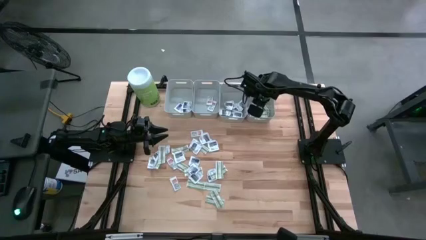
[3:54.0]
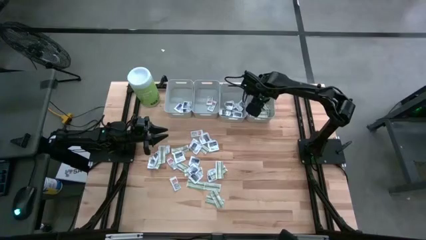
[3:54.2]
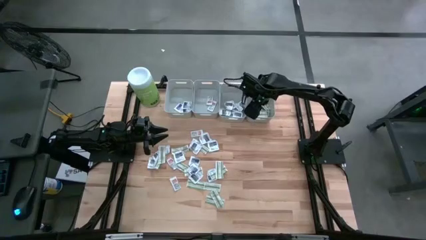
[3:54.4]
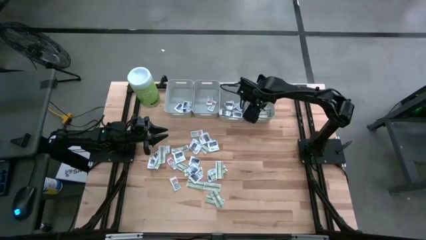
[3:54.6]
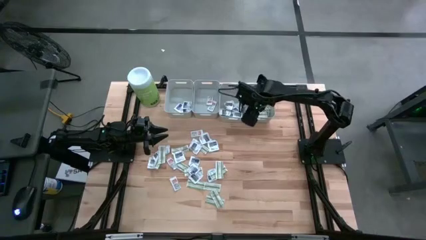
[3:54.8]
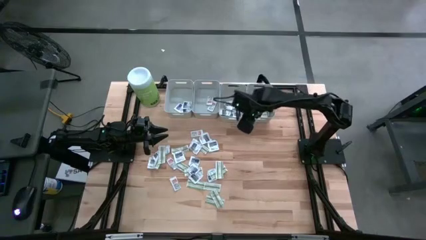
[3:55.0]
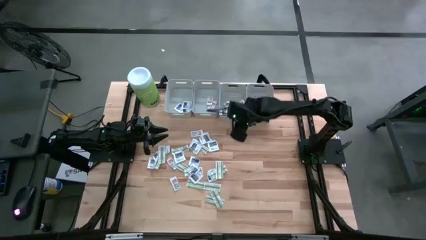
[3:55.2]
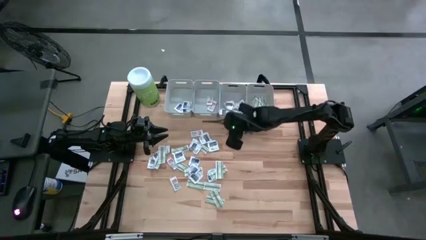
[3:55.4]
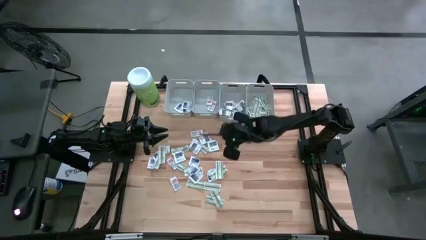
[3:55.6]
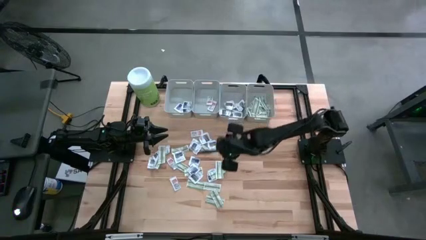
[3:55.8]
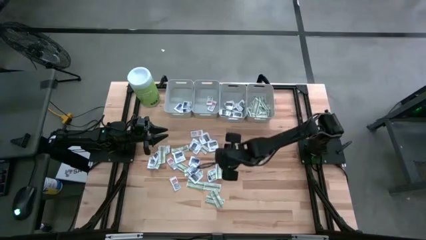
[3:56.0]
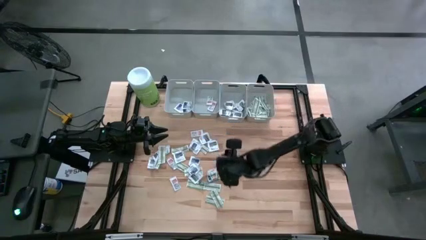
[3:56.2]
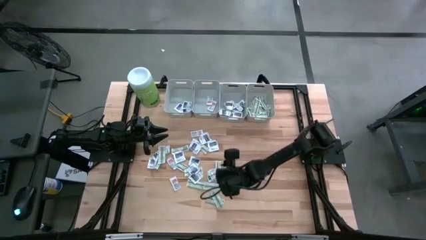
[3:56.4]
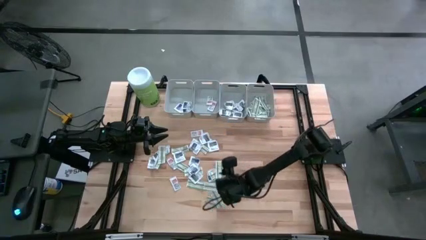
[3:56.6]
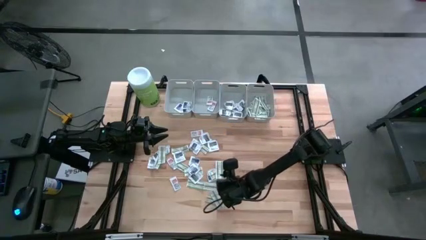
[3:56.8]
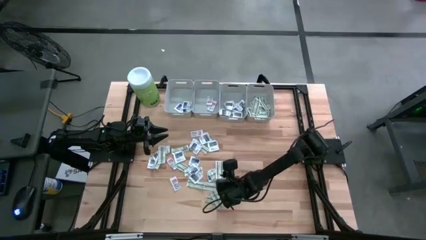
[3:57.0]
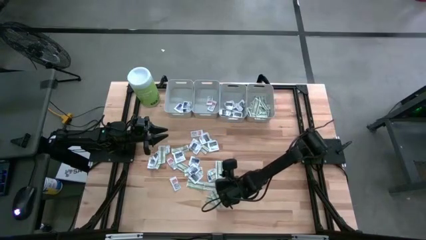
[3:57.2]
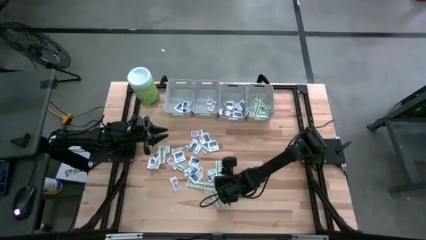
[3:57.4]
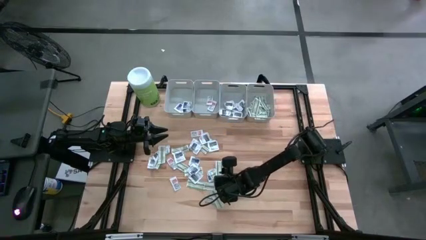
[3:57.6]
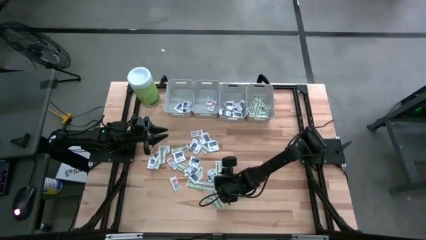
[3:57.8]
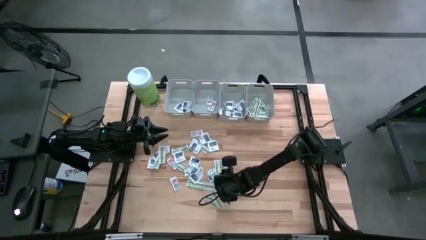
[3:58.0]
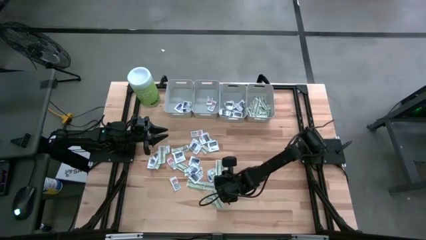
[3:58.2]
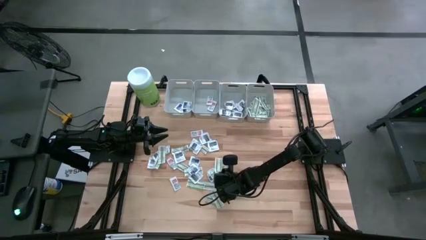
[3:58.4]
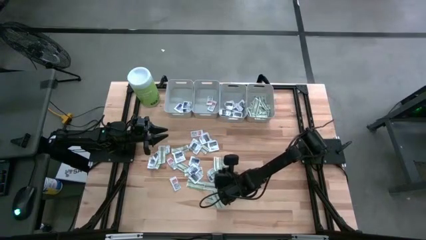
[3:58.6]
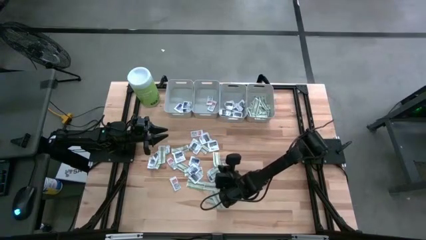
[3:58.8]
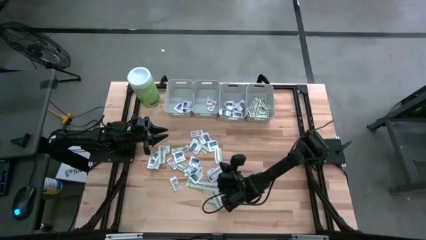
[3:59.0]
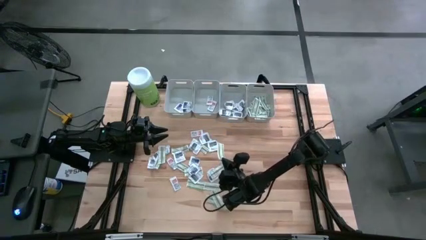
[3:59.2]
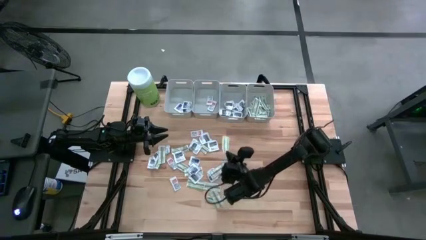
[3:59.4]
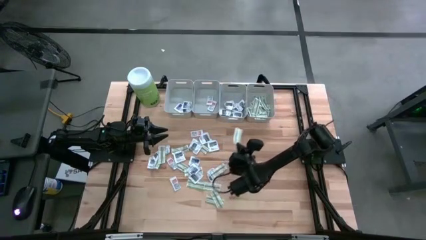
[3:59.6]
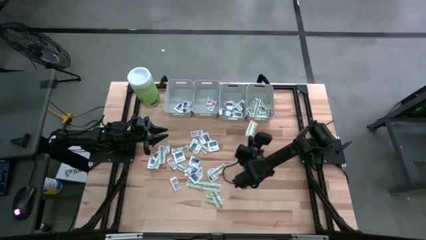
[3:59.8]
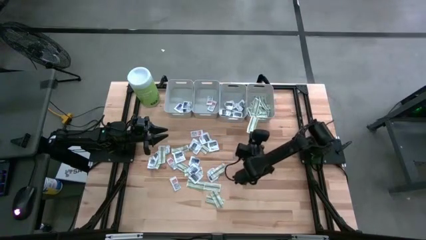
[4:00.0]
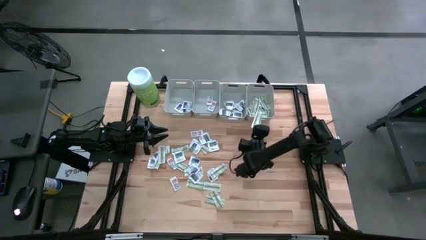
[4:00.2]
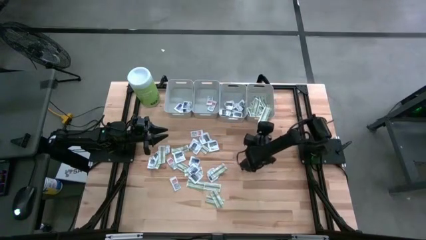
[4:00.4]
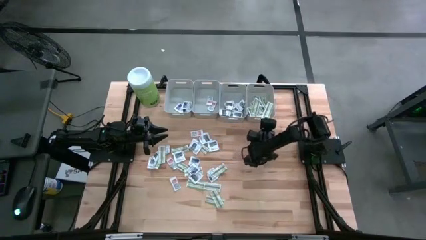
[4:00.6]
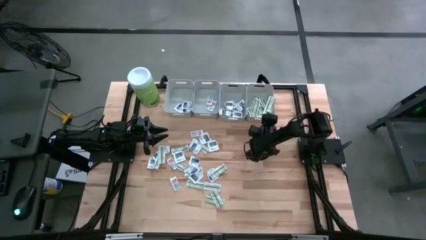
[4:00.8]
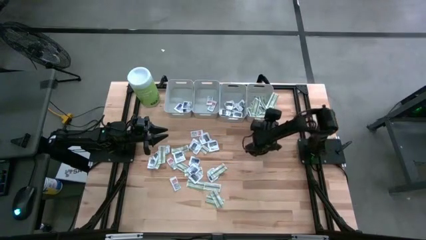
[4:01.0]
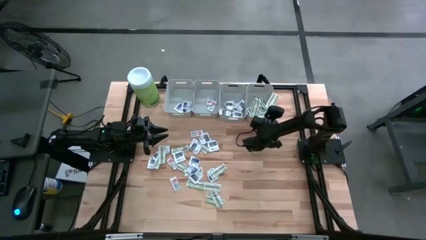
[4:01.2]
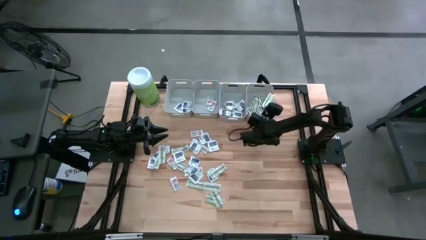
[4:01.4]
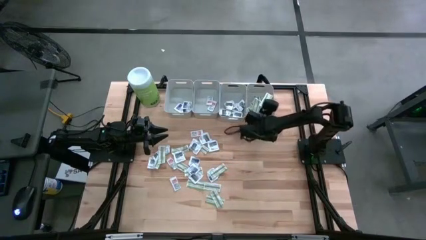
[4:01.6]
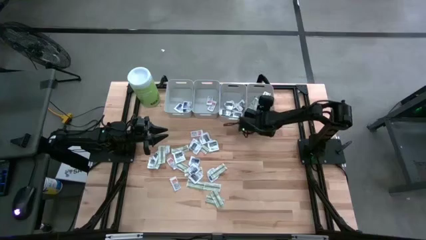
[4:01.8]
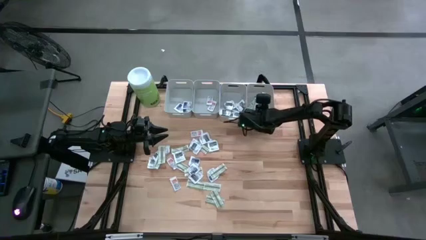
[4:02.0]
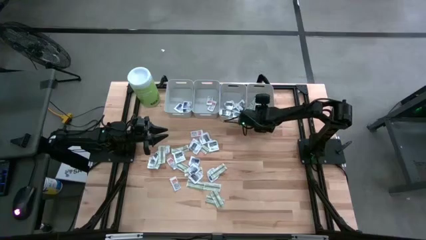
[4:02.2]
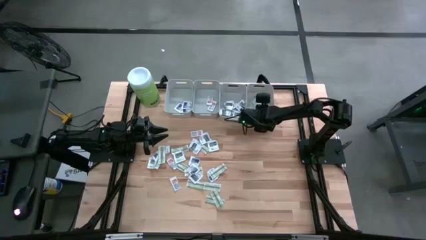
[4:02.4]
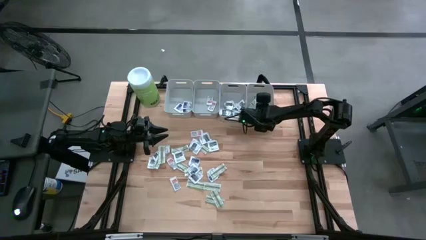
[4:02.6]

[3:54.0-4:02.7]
Task: Pick & Place First Aid Supplies
Put the bandage into the right gray bin

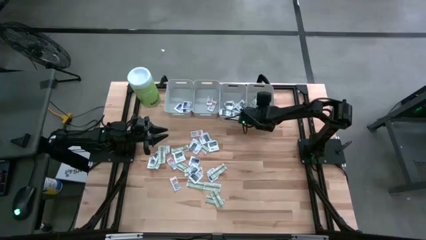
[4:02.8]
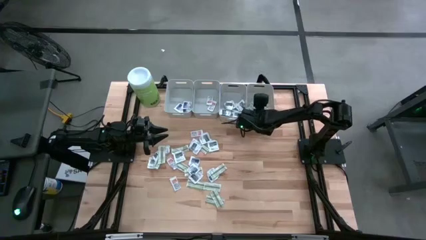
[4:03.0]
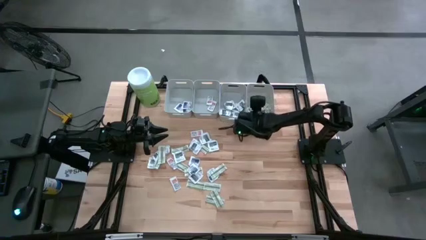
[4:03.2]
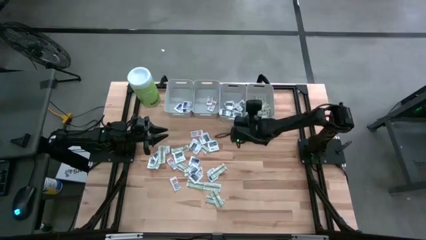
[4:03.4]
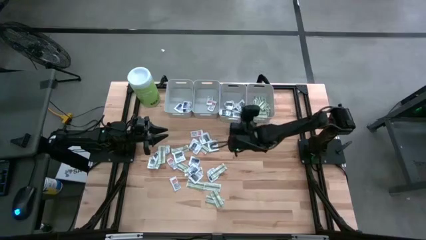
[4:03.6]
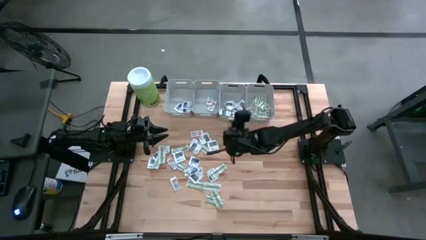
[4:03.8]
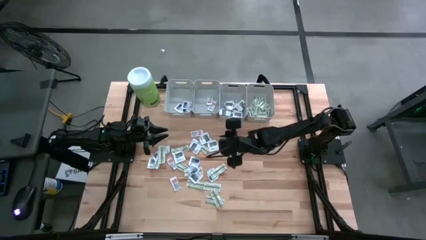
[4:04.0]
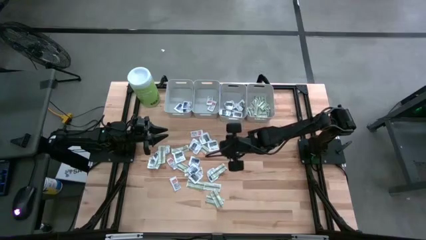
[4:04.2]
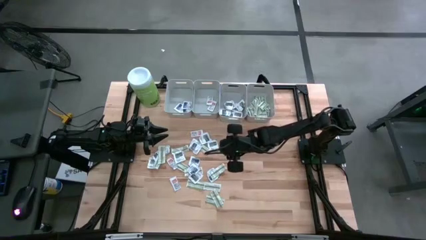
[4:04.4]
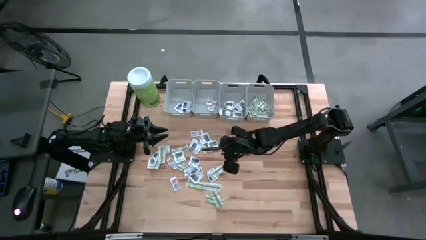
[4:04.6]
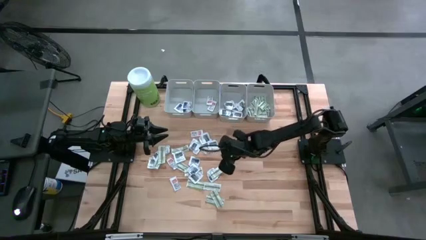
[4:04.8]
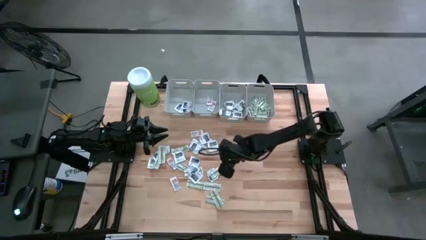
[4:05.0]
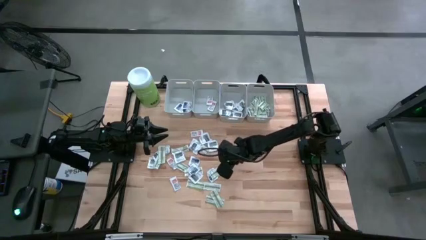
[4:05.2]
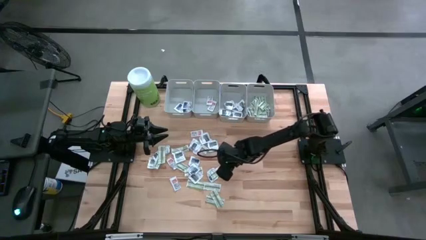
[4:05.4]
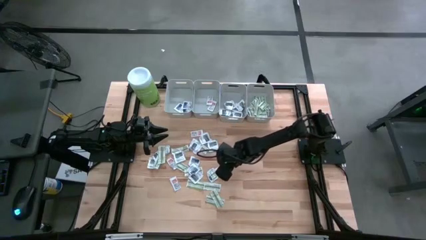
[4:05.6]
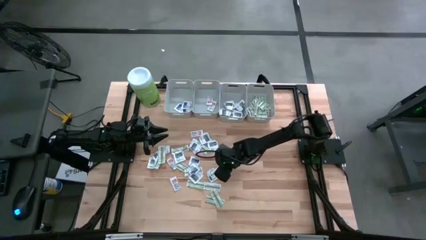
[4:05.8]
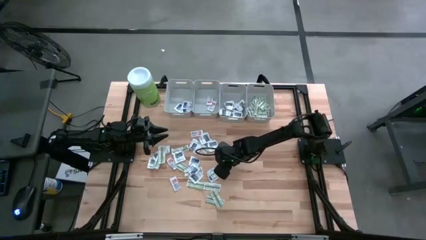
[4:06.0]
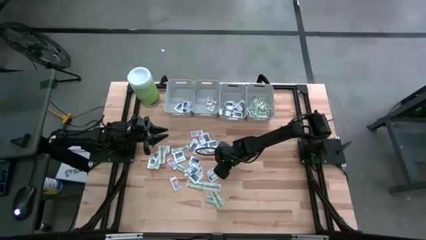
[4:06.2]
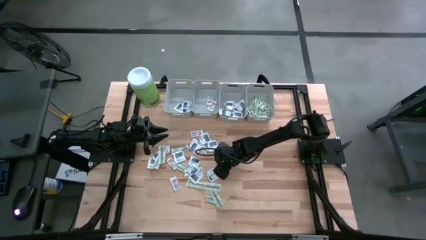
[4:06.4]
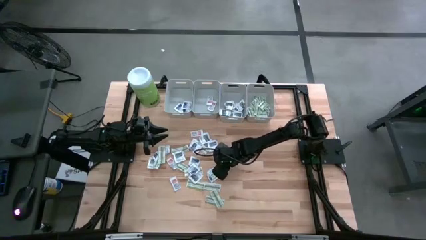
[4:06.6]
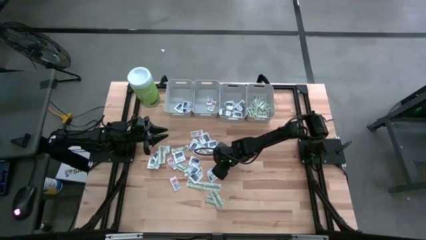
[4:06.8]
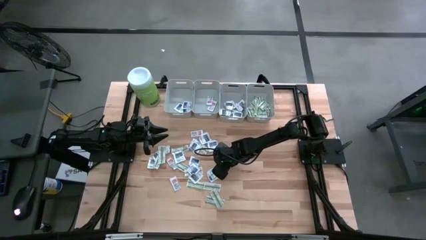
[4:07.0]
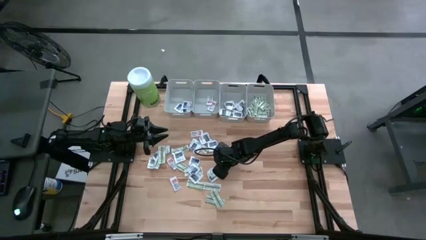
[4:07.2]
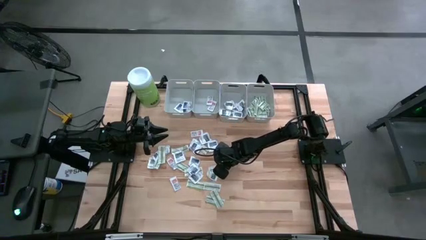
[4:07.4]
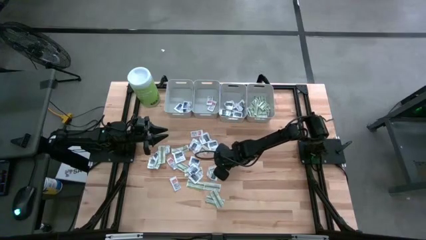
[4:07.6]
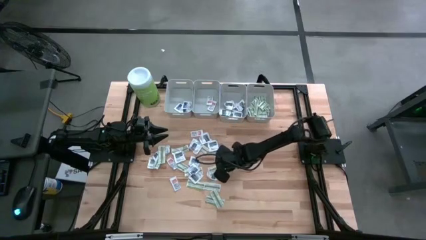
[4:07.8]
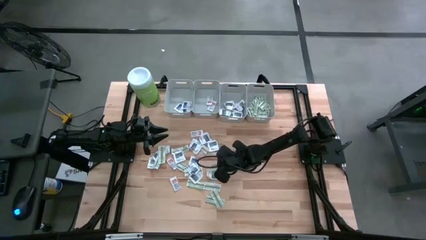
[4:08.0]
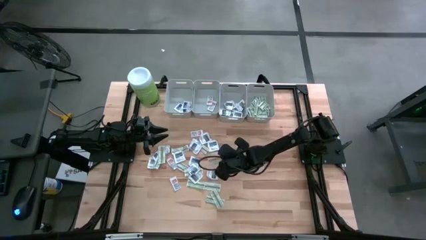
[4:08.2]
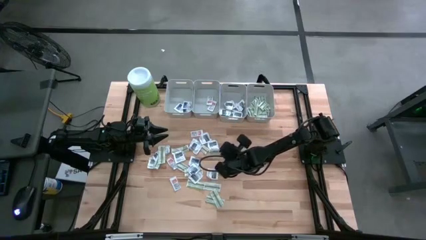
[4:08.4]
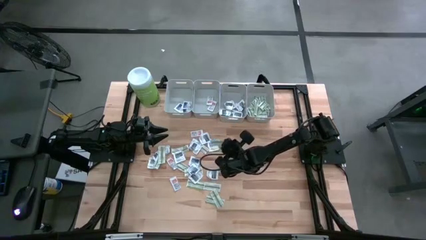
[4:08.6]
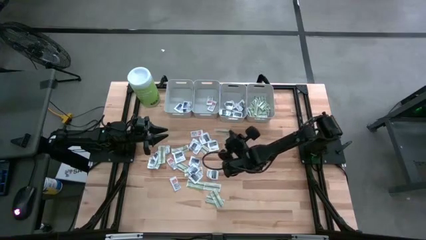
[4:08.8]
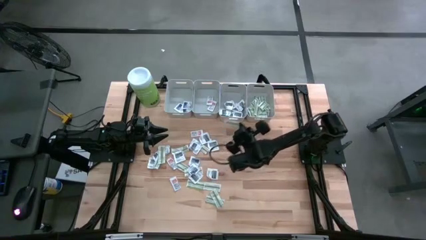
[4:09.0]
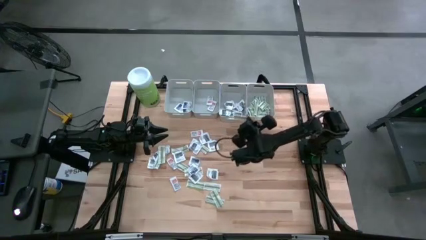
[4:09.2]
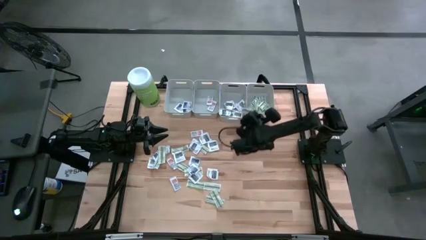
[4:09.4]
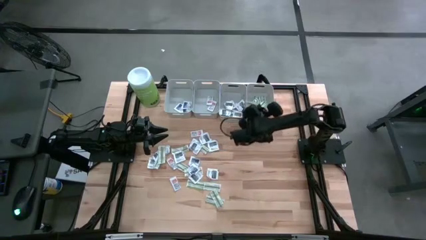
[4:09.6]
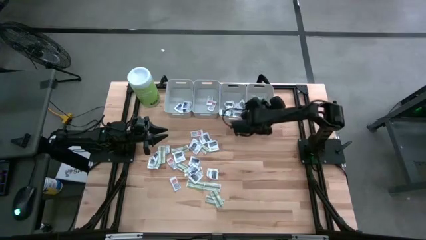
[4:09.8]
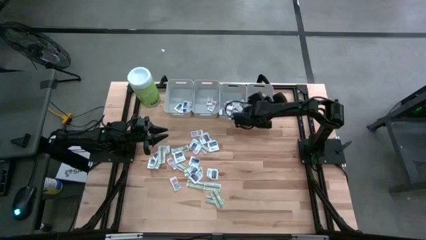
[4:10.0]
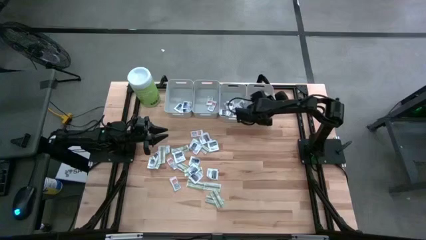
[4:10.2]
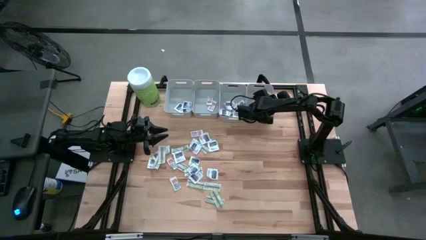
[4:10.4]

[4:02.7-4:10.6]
Put the bandage into the right gray bin
